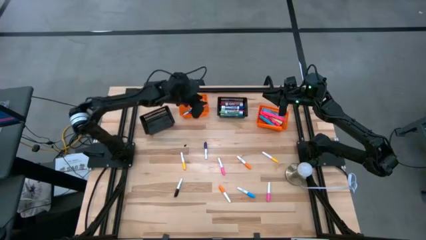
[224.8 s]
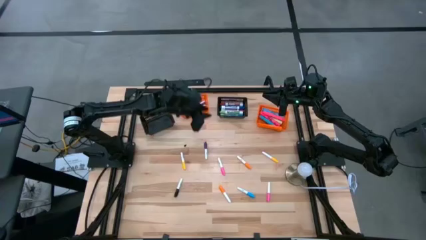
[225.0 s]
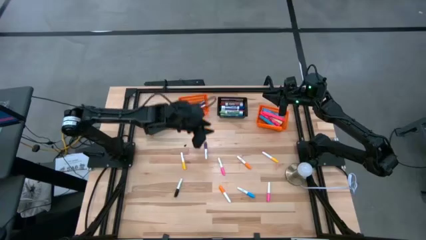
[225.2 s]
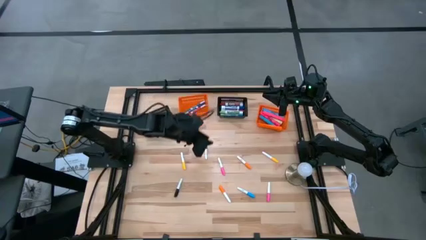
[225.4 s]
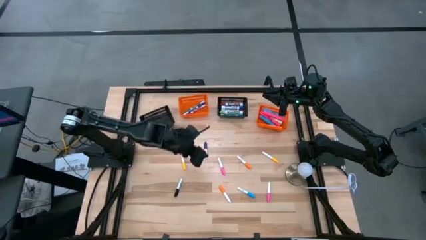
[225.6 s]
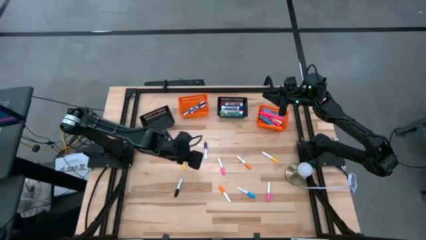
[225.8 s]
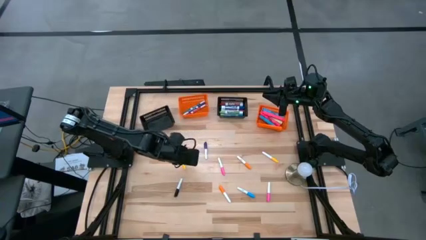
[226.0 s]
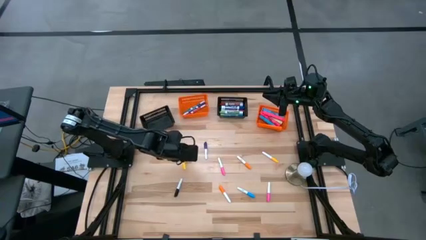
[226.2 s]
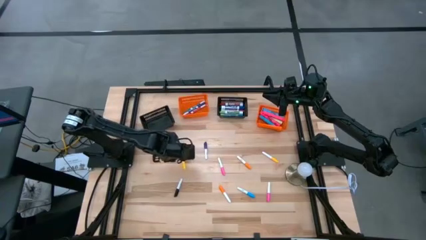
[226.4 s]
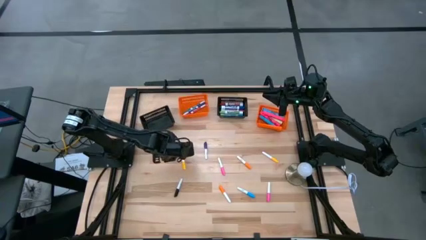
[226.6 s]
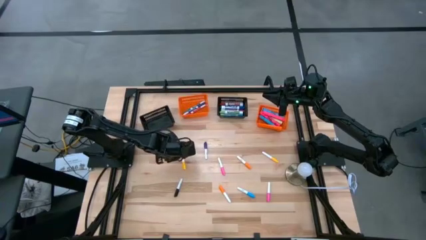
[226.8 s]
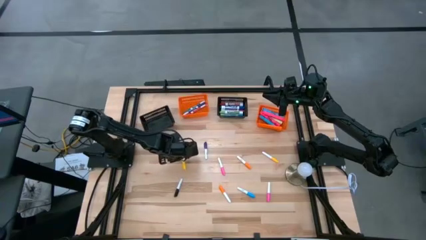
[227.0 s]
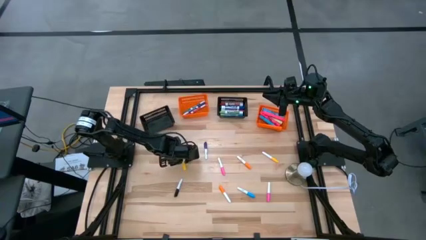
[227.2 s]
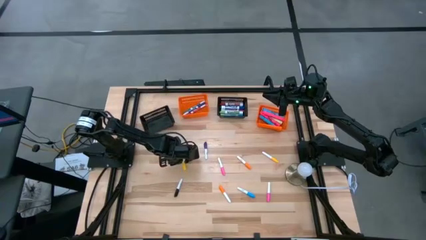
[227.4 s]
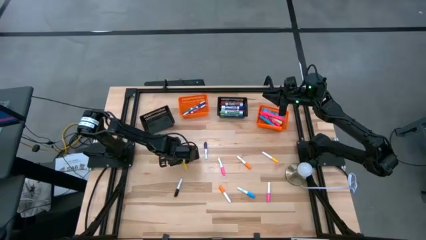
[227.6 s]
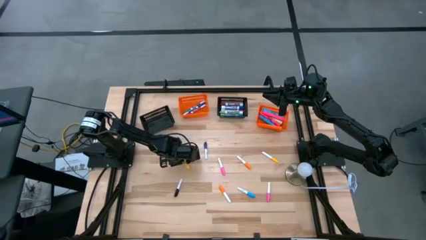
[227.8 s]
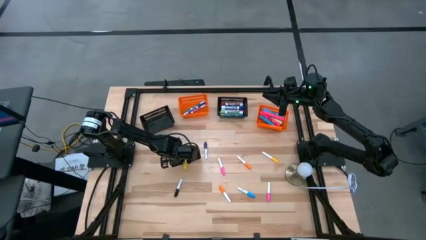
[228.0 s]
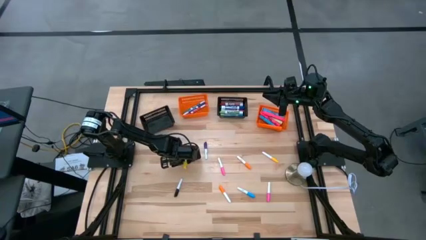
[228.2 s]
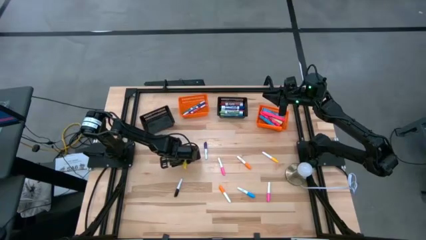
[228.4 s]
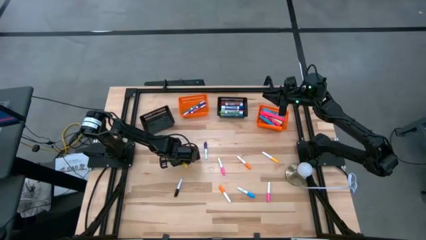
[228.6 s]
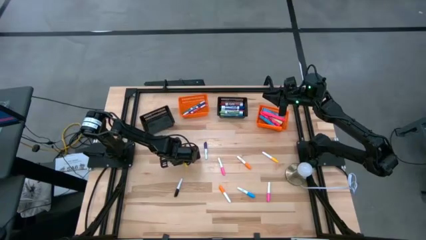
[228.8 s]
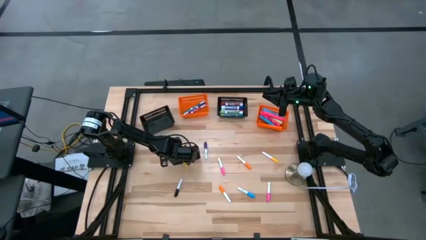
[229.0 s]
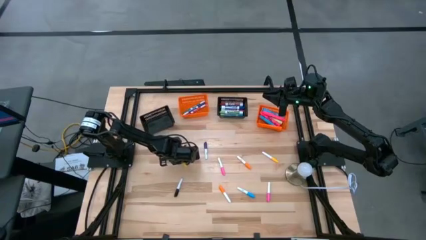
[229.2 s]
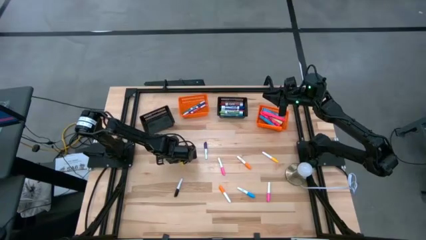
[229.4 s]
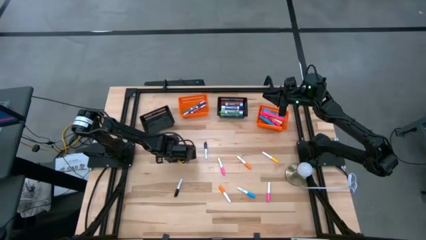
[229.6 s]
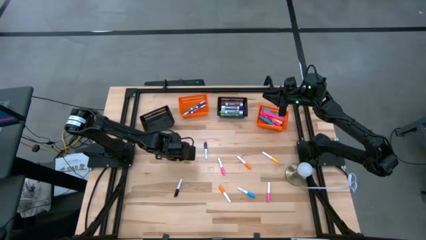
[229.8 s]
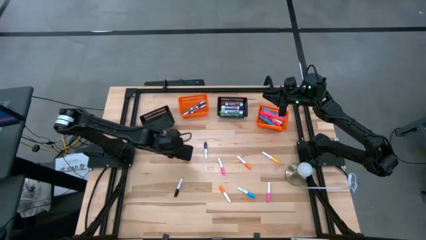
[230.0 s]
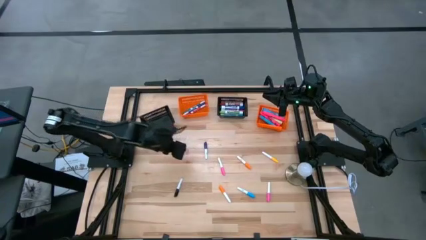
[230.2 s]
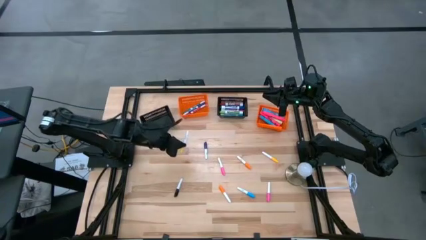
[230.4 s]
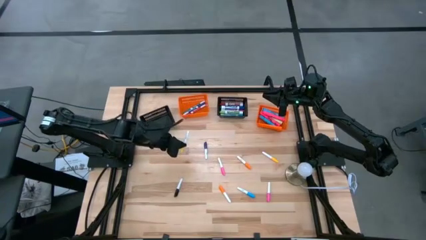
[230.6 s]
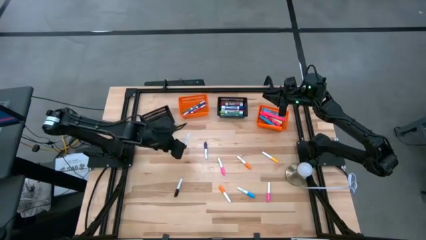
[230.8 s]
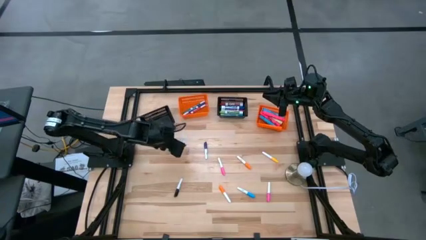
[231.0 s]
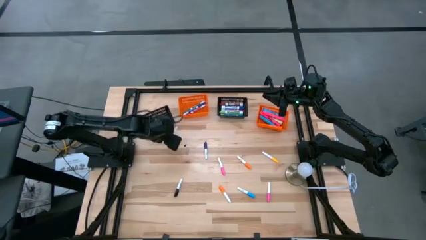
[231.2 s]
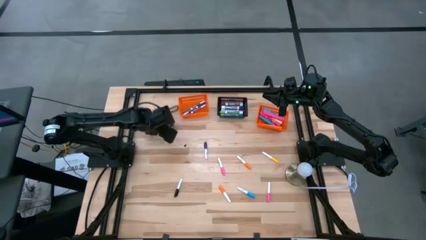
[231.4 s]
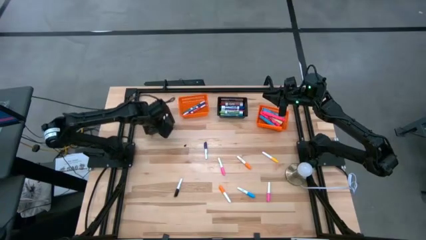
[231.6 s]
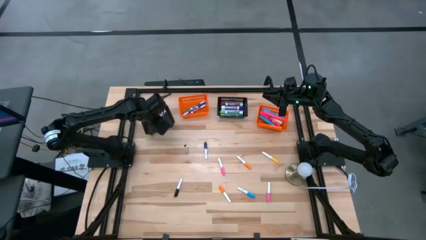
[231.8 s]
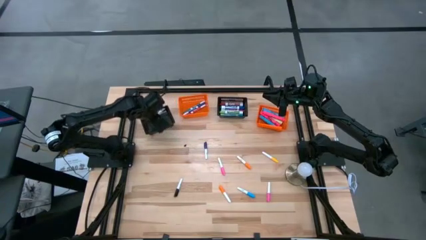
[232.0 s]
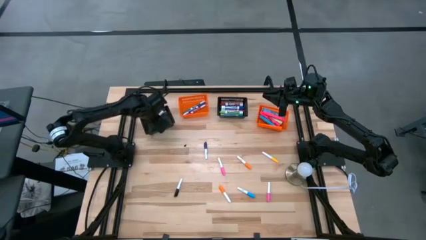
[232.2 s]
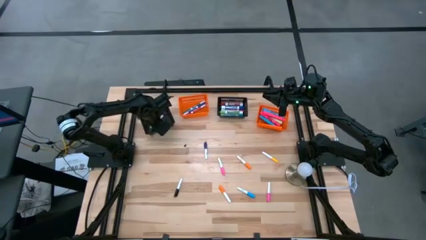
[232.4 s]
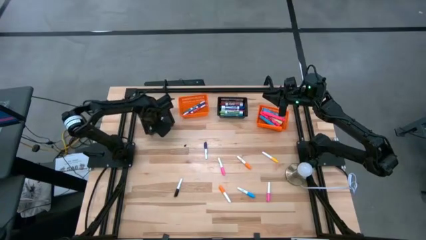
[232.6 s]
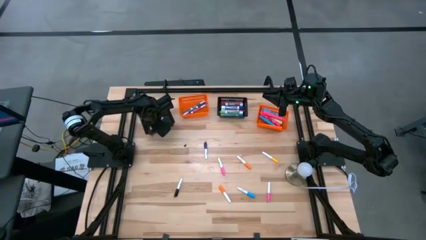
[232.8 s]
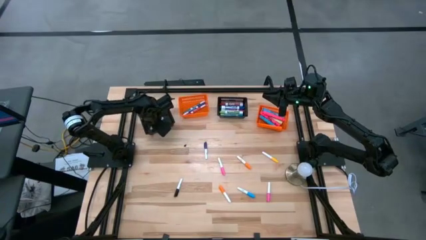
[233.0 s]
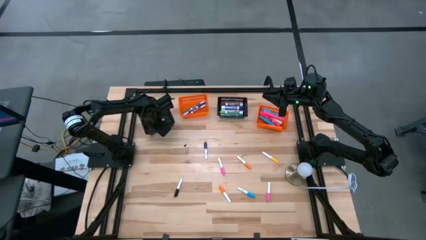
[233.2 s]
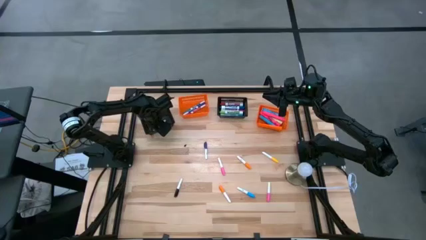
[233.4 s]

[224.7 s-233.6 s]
Task: Pick & Place Markers
Put the white yellow marker into the left black bin

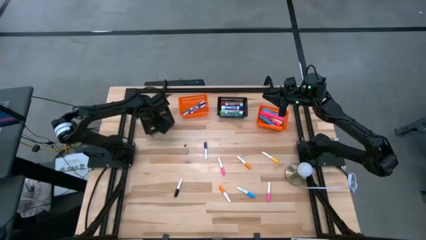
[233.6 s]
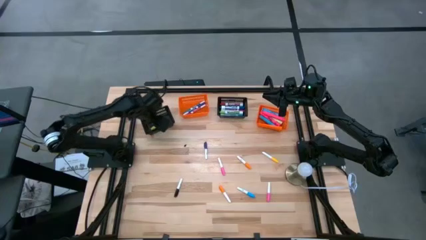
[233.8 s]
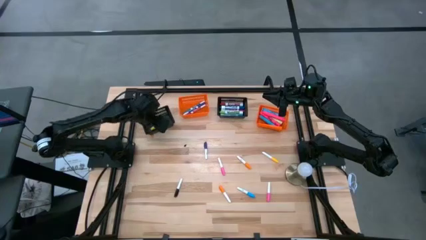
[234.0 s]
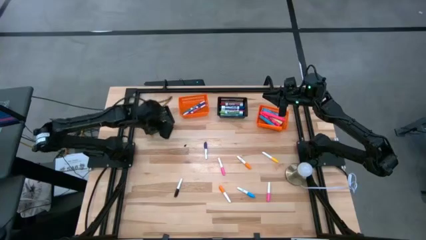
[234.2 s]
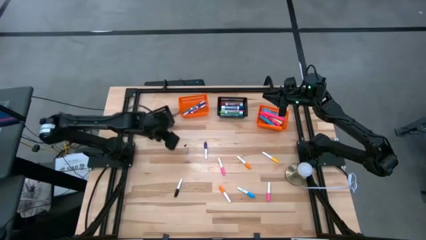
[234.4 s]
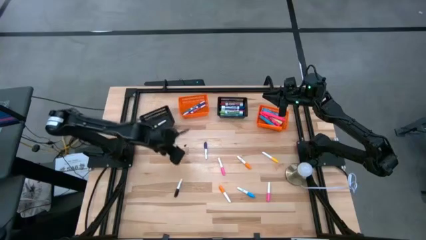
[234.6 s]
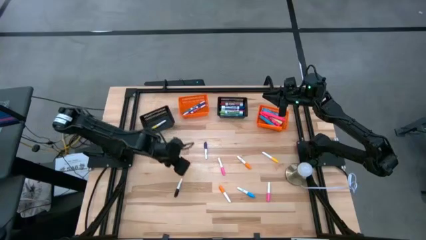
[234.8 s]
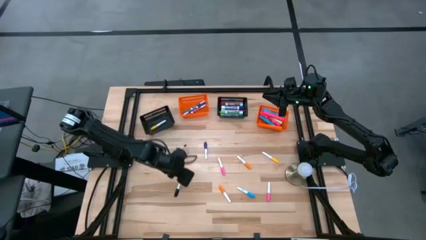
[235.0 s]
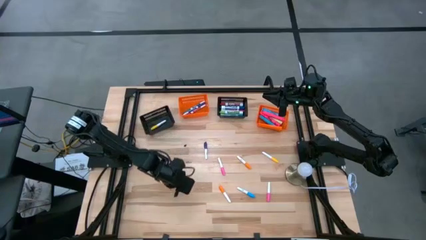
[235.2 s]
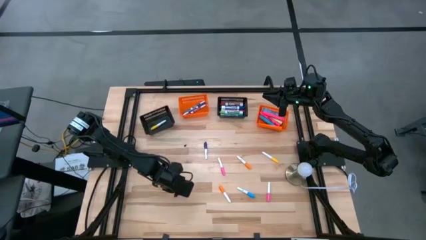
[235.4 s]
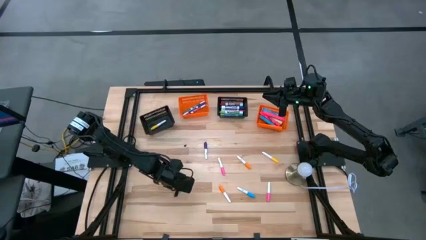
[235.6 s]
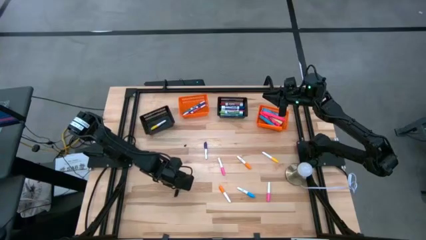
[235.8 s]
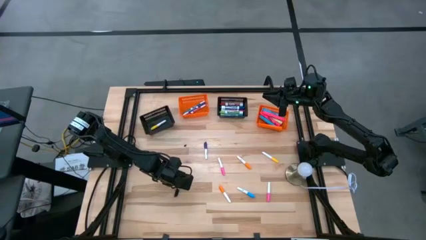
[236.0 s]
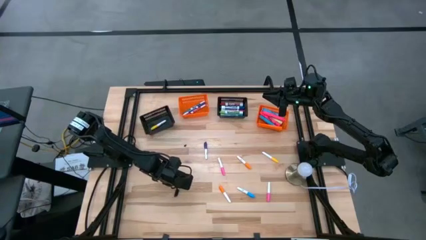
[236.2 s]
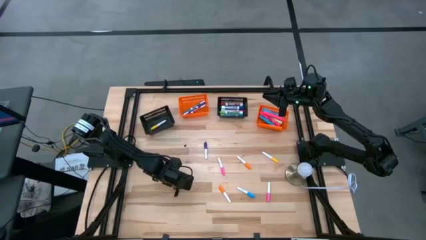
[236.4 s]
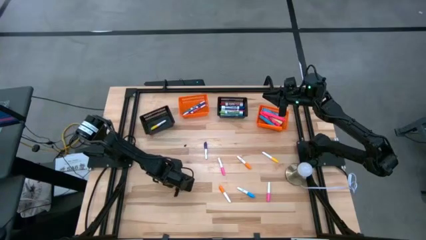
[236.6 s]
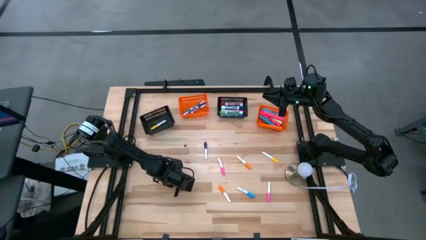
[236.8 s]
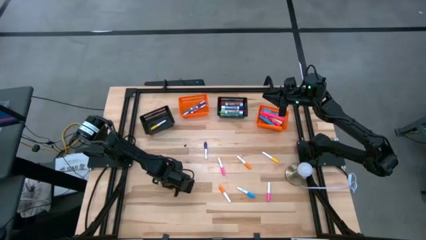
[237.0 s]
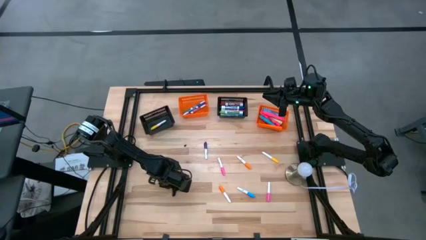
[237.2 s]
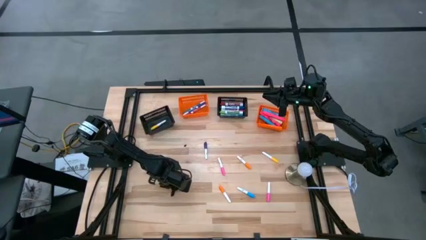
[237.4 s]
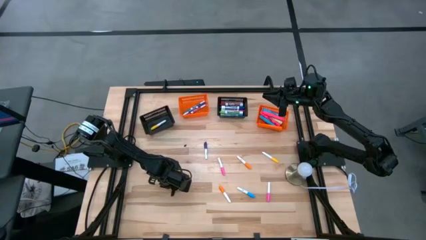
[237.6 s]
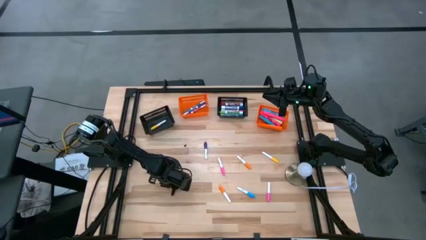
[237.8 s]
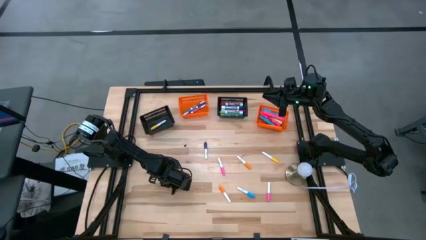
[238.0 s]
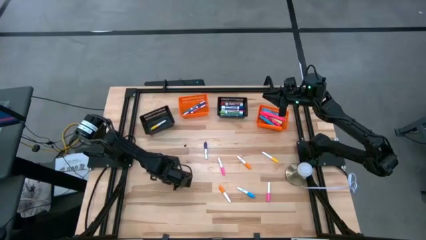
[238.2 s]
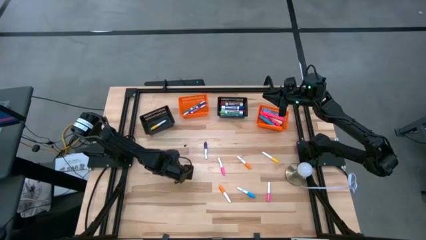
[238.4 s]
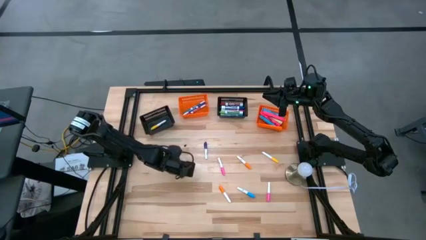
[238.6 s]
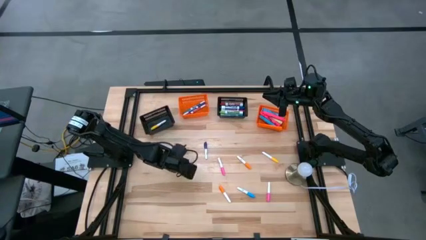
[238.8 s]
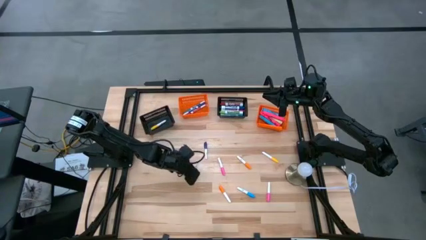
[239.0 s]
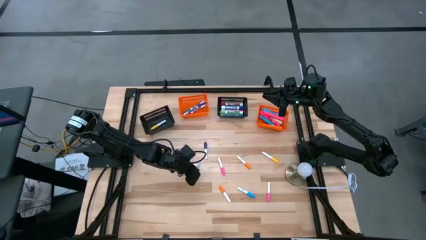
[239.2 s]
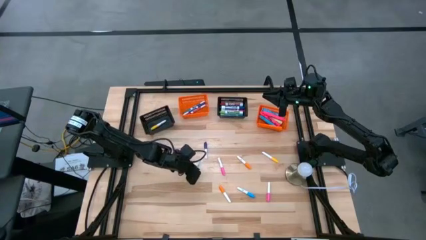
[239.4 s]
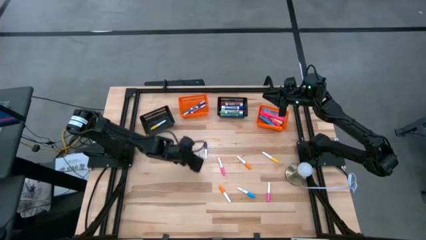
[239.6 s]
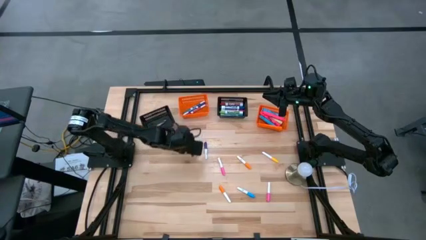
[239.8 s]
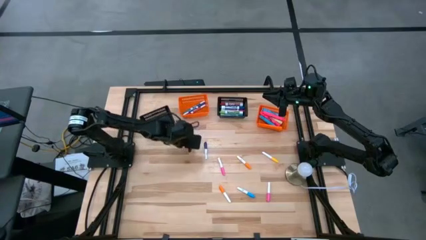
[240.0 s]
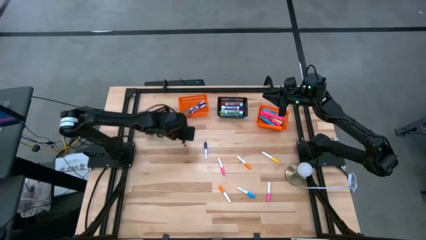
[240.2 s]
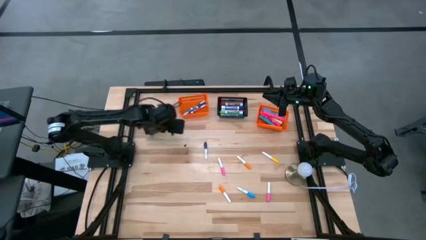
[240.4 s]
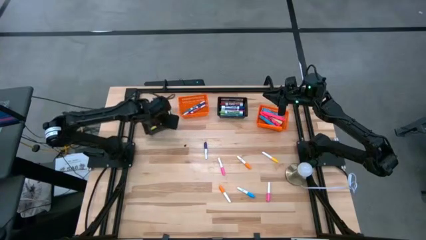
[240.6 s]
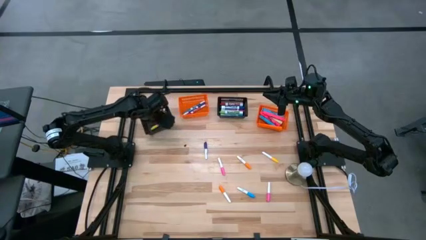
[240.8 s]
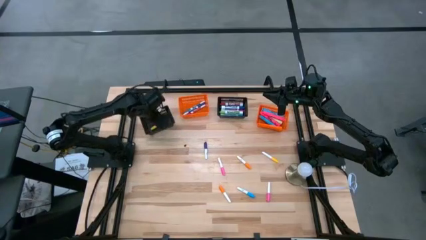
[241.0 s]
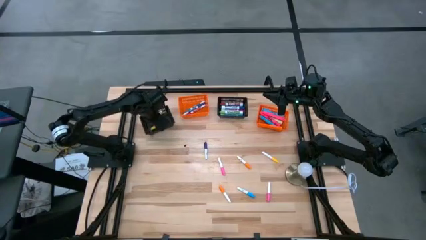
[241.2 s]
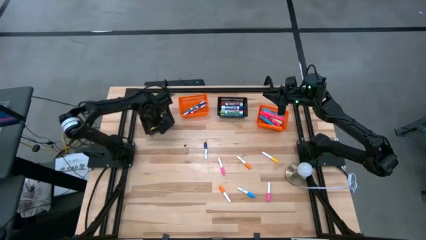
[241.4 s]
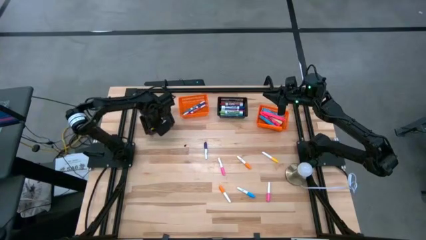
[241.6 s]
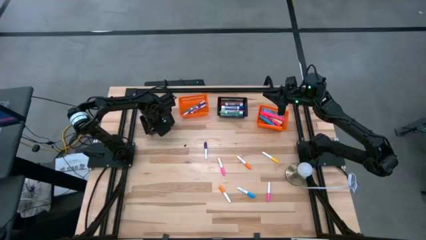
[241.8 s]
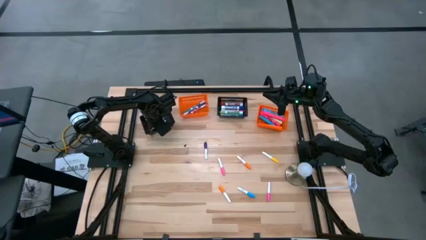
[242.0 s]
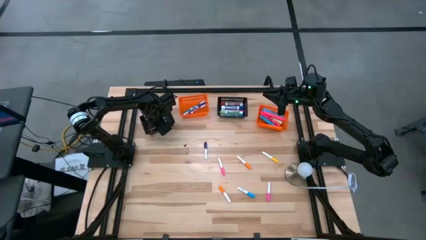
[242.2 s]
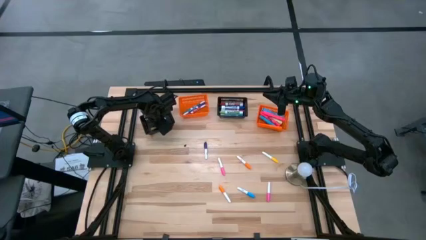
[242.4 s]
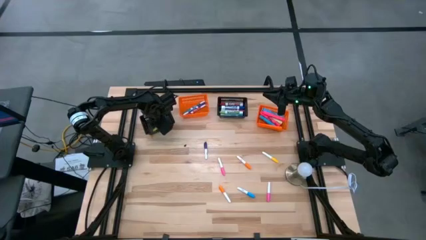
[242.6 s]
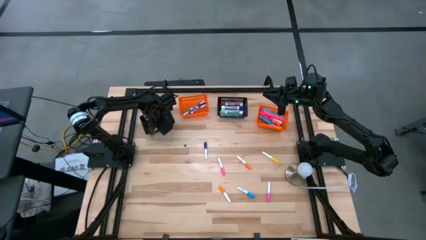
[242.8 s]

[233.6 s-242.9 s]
Put the white black marker into the left black bin
